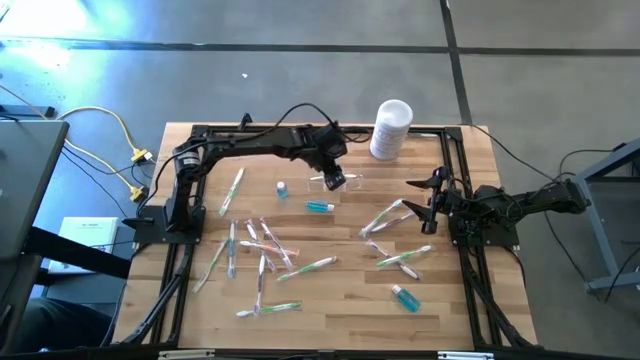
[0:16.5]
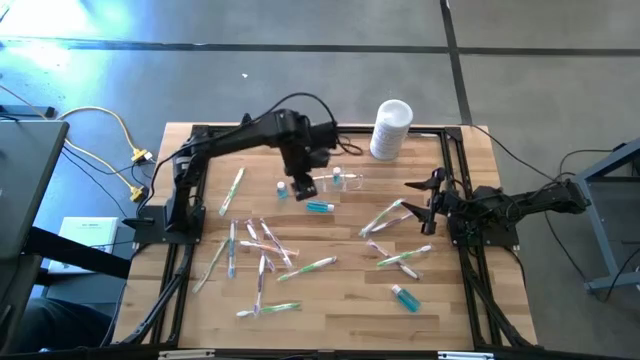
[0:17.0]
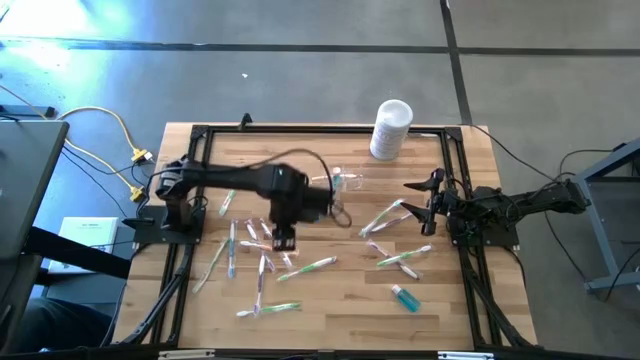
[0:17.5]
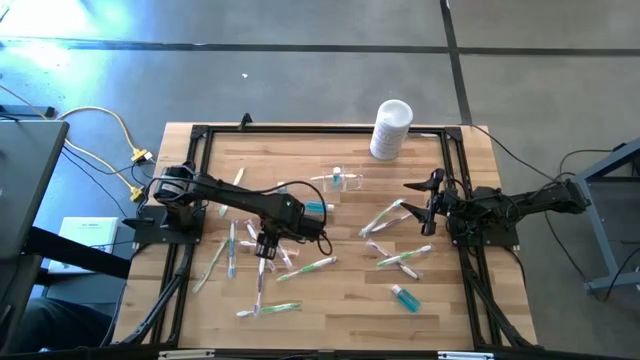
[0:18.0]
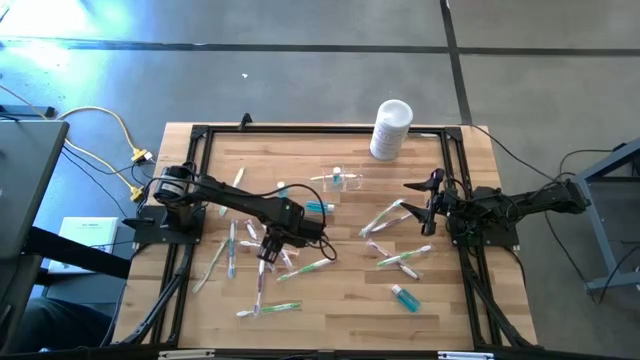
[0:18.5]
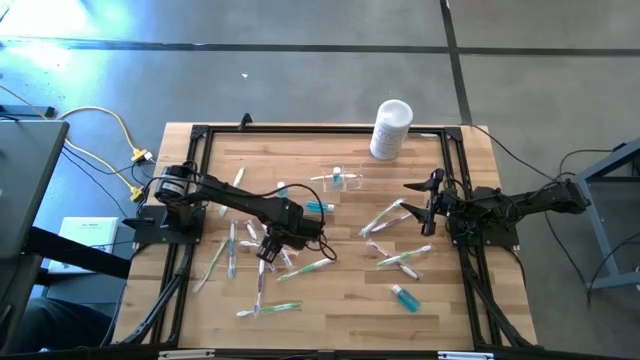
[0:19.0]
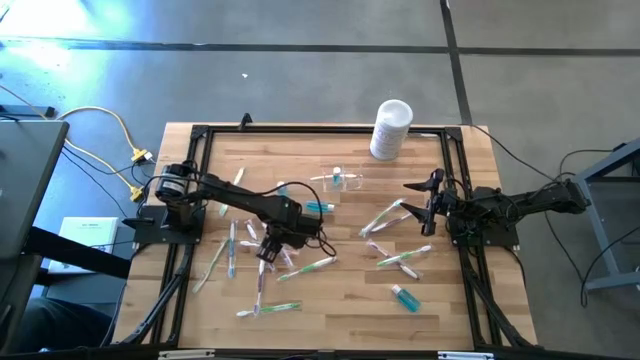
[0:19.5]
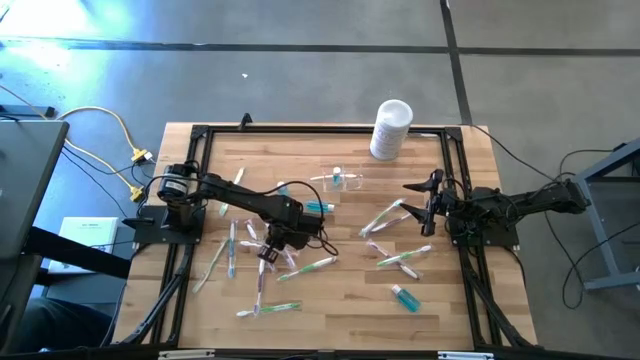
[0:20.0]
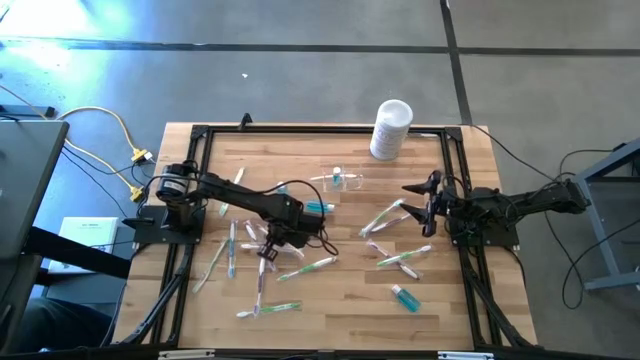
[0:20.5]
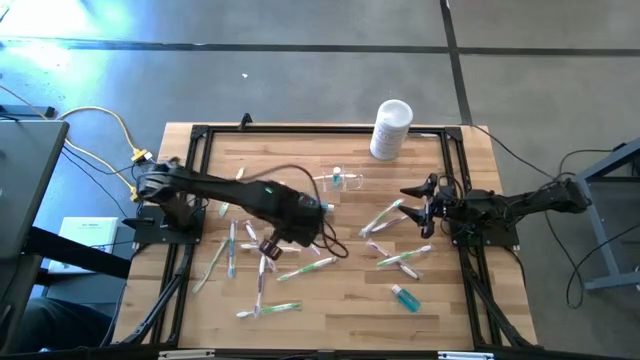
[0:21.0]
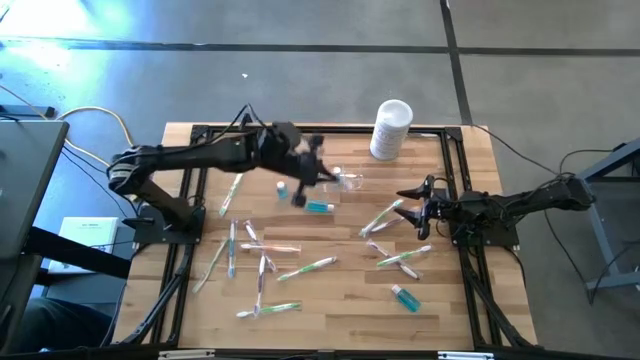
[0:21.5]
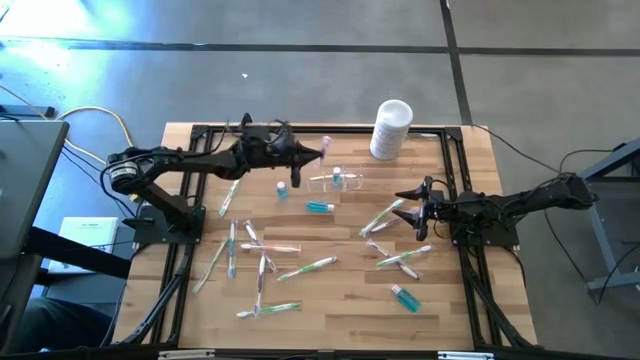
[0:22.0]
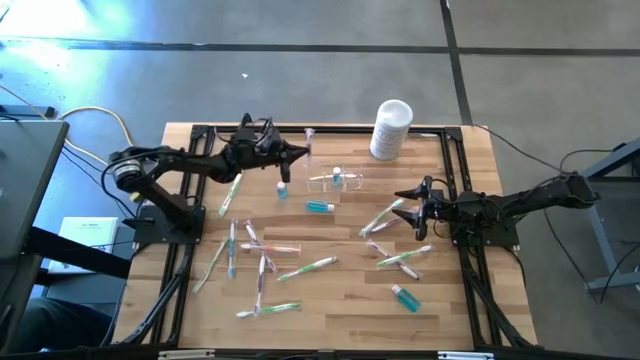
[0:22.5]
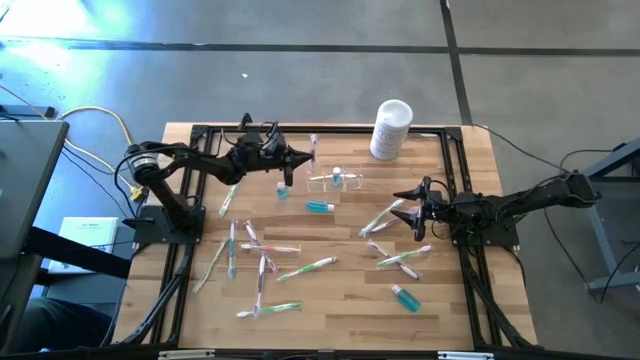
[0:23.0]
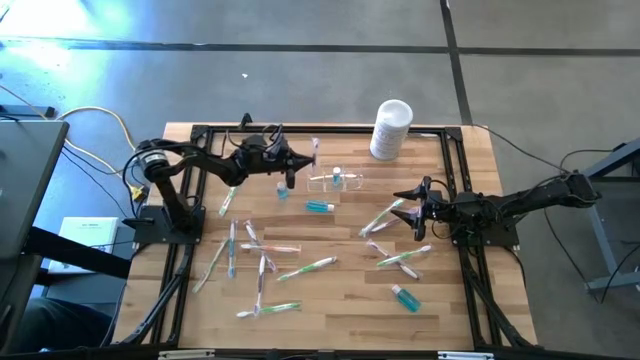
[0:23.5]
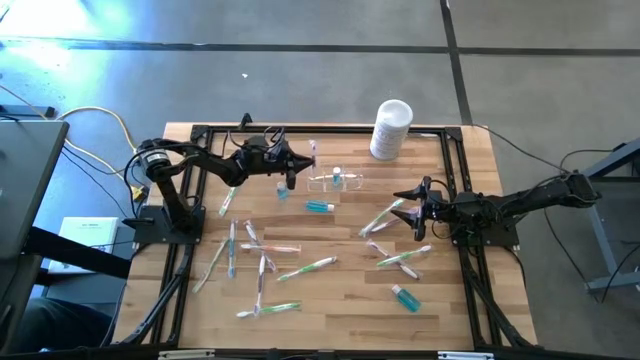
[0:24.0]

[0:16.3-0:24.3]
Task: Pick & Place toothbrushing station
Put the purple toothbrush into the transparent organizer

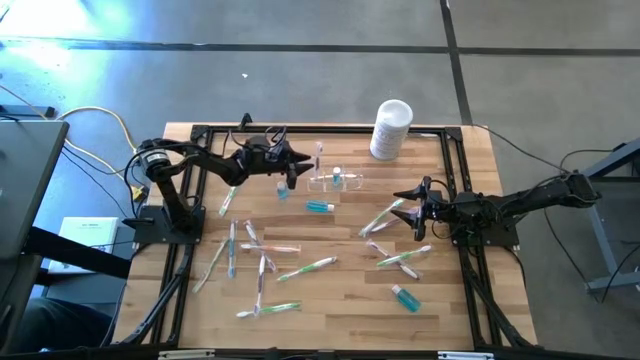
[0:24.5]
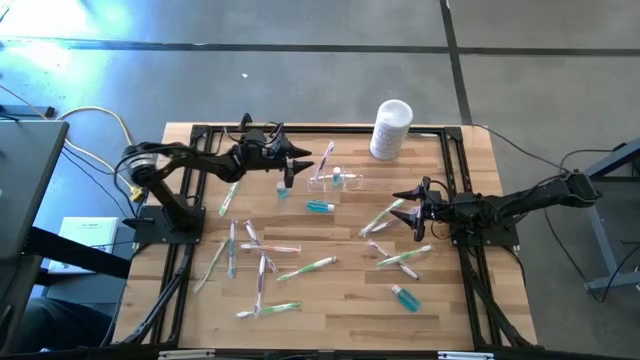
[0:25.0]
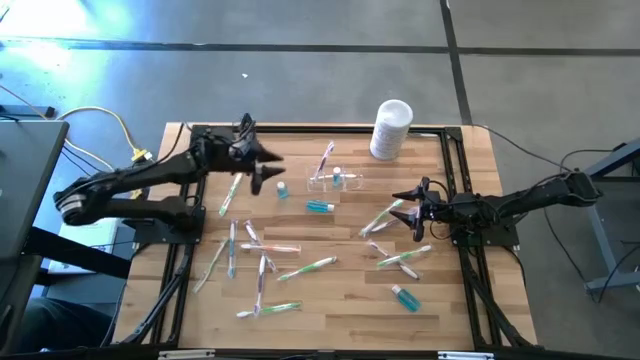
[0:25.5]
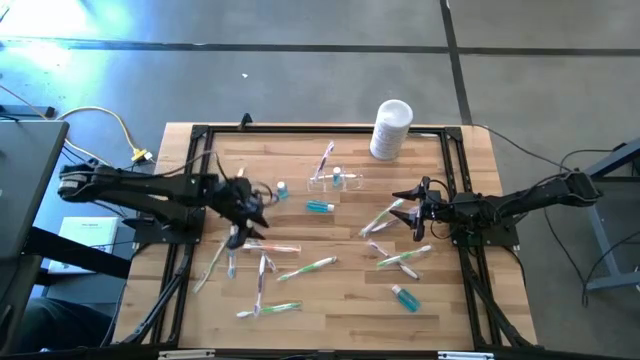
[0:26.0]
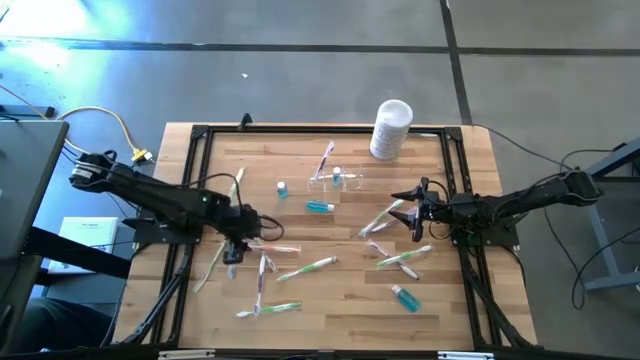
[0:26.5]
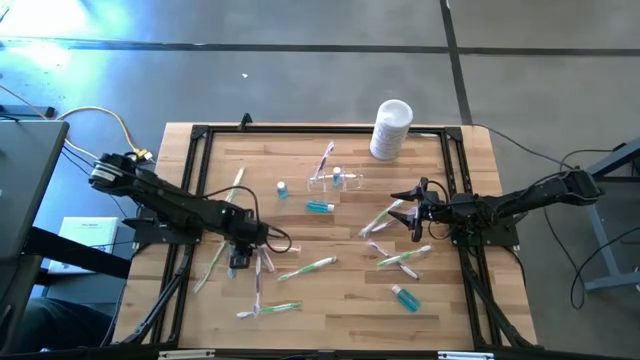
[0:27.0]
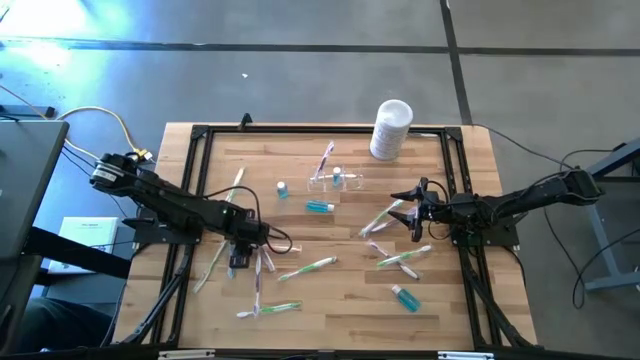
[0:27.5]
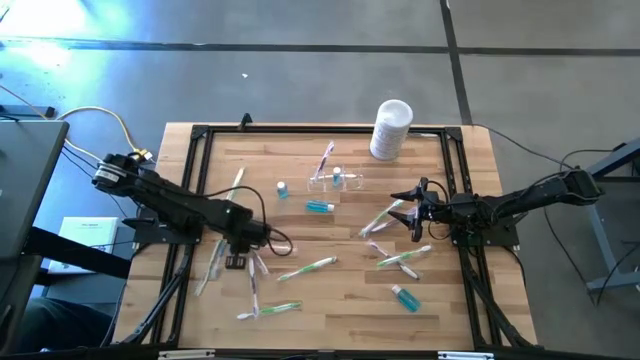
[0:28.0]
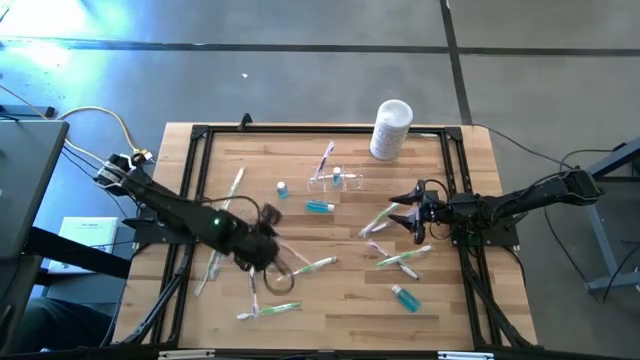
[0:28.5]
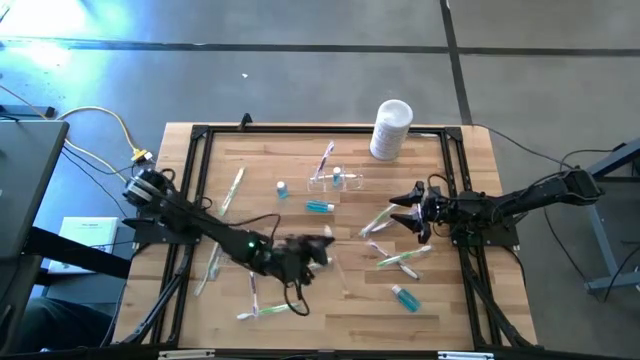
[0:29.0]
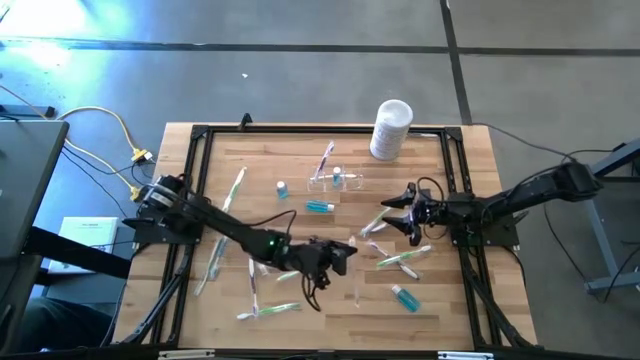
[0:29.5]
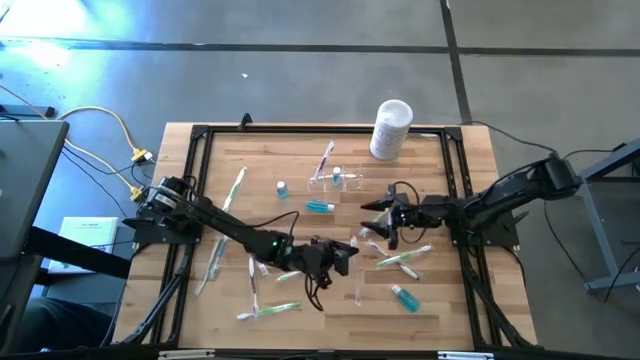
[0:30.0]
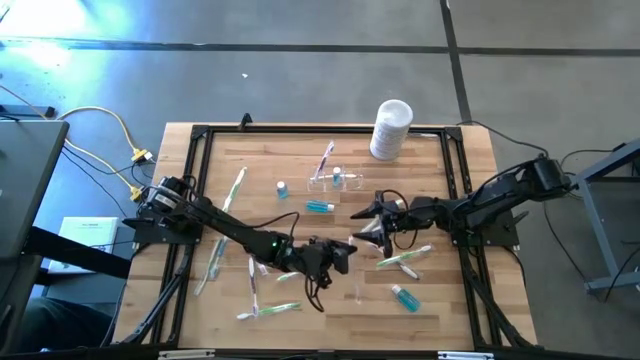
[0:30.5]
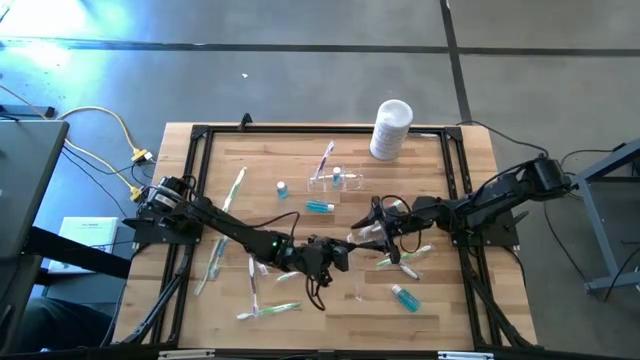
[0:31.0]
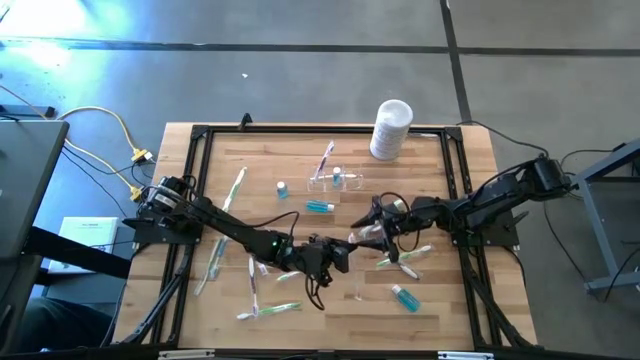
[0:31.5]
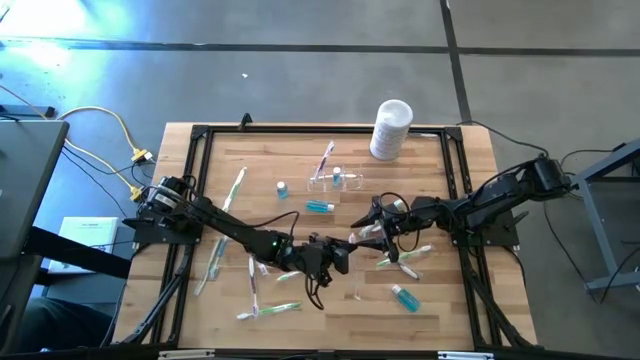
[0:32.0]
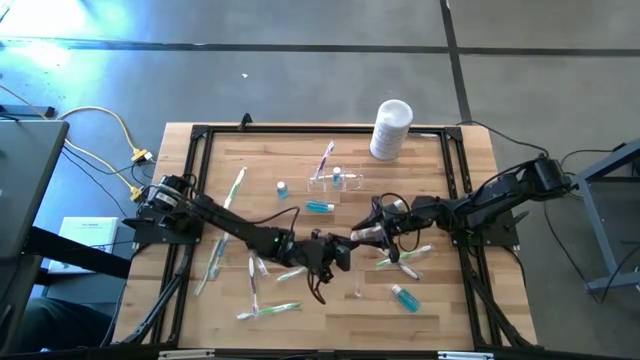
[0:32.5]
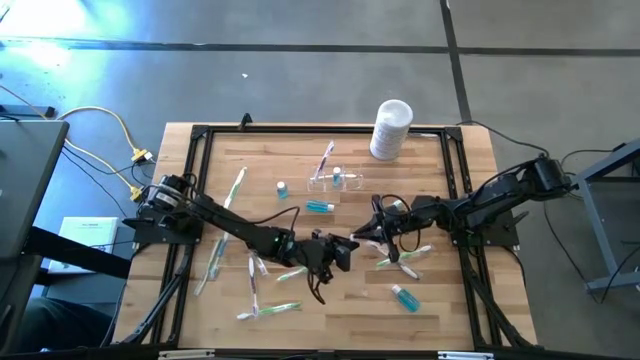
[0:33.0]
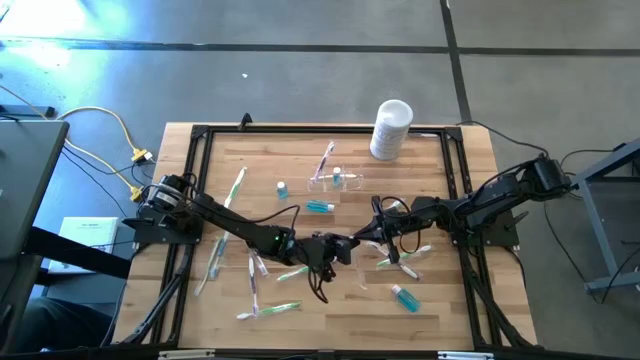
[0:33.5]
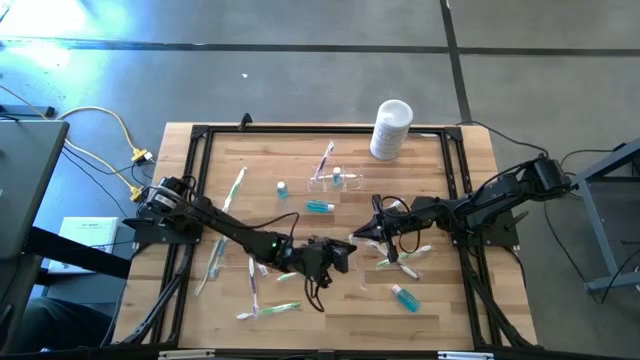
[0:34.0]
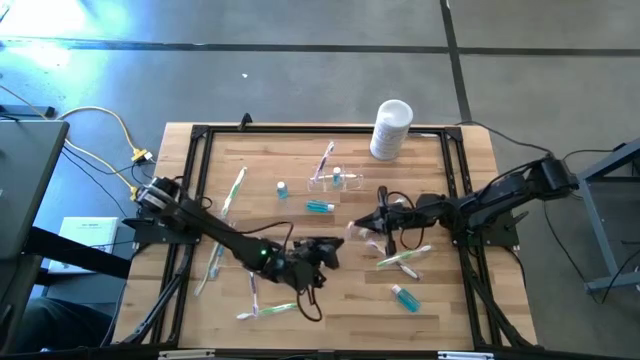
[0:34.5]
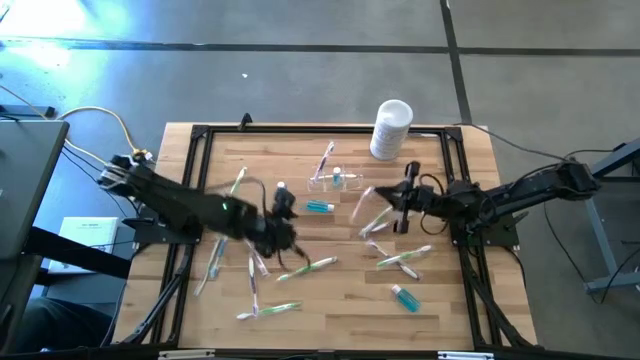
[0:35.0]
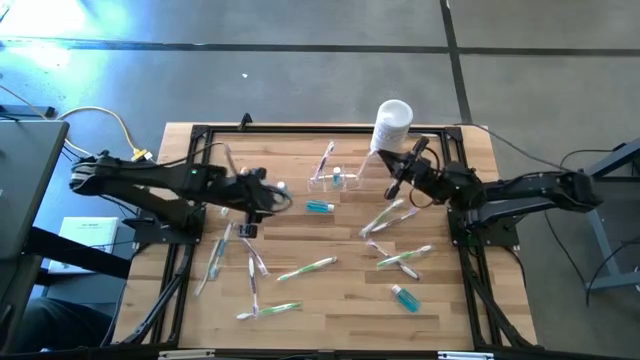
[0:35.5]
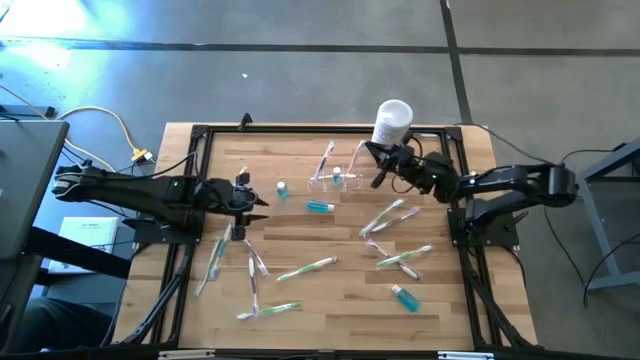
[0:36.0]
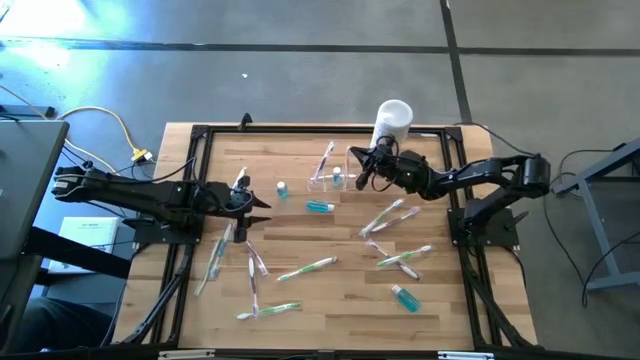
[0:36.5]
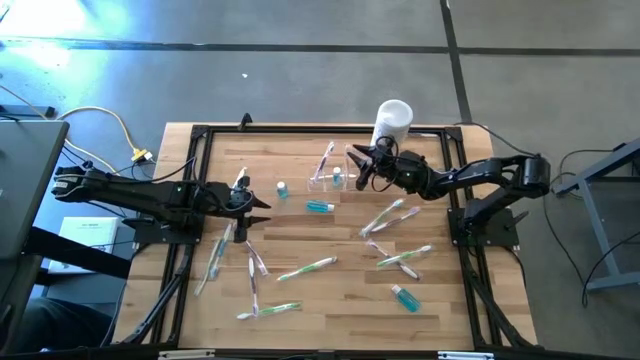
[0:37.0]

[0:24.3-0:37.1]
Put the orange toothbrush into the transparent organizer
